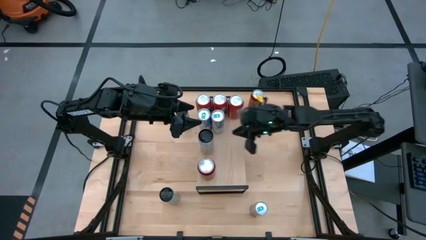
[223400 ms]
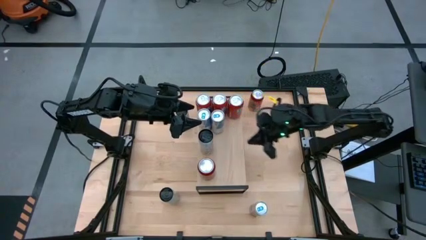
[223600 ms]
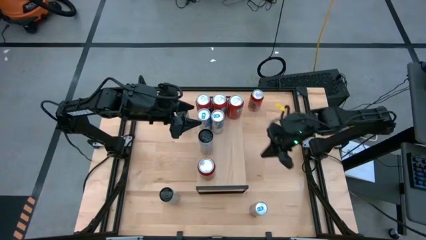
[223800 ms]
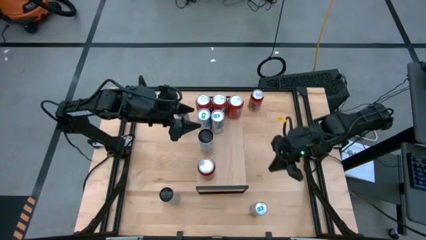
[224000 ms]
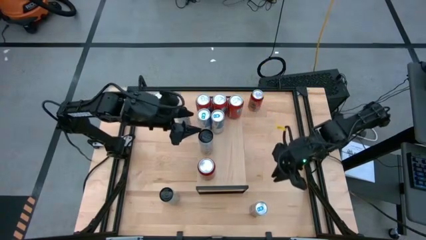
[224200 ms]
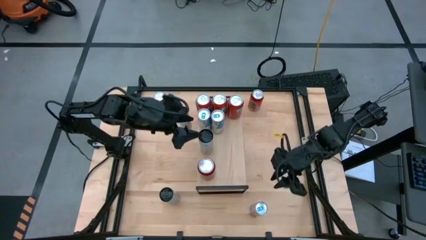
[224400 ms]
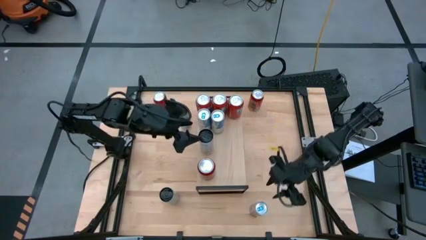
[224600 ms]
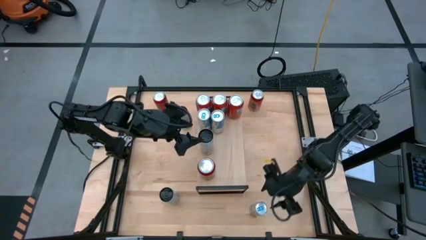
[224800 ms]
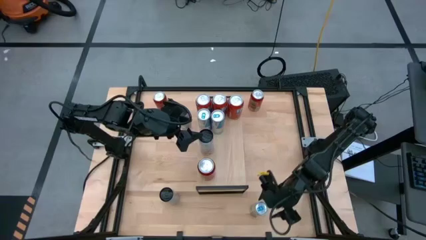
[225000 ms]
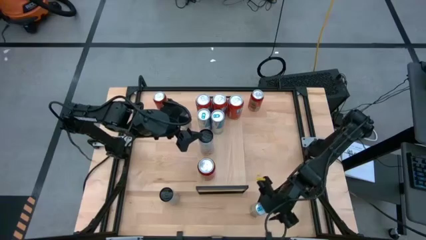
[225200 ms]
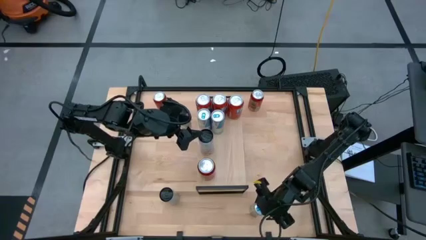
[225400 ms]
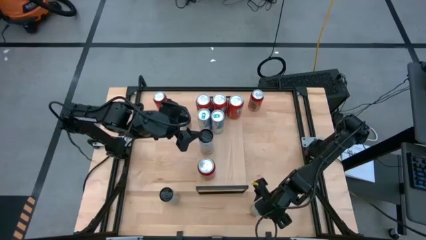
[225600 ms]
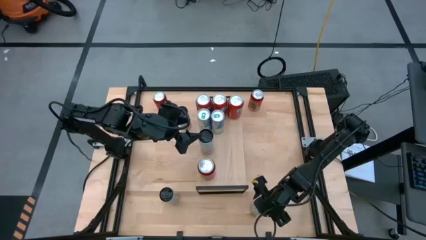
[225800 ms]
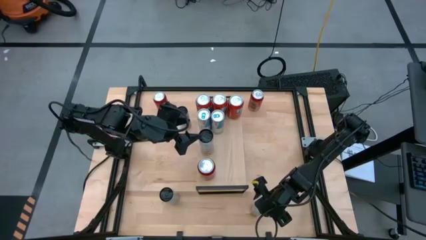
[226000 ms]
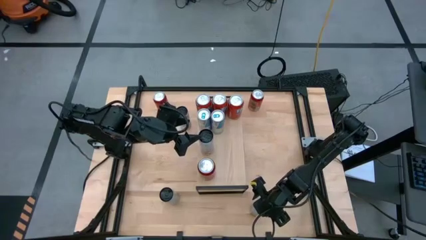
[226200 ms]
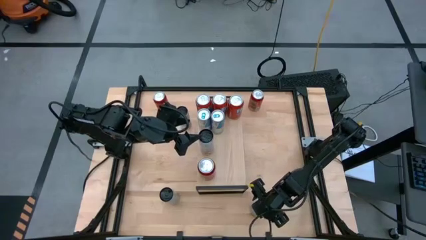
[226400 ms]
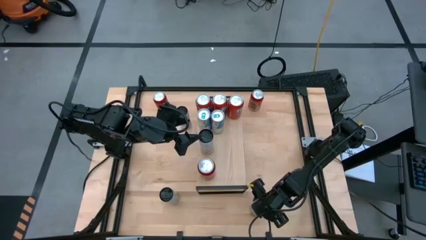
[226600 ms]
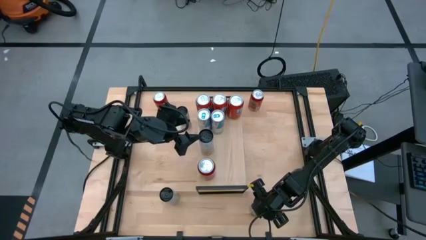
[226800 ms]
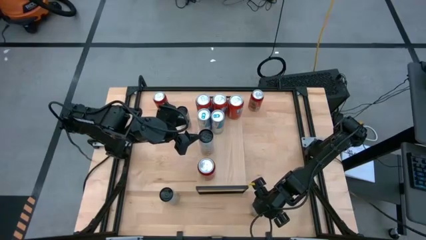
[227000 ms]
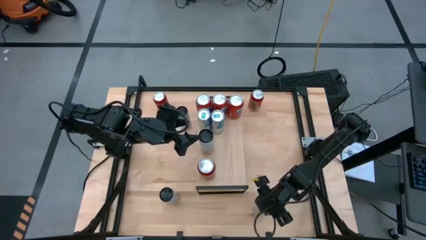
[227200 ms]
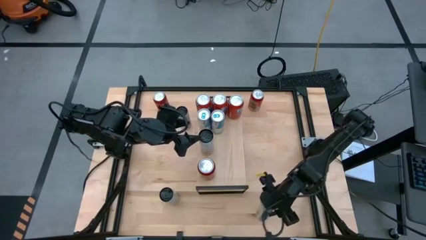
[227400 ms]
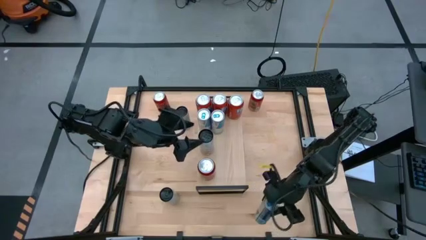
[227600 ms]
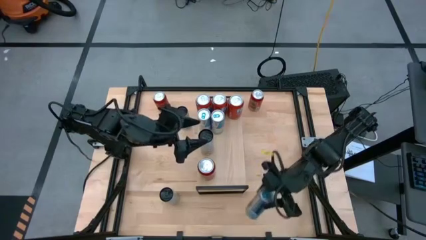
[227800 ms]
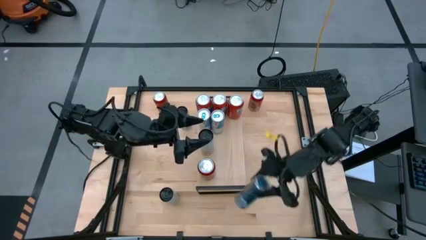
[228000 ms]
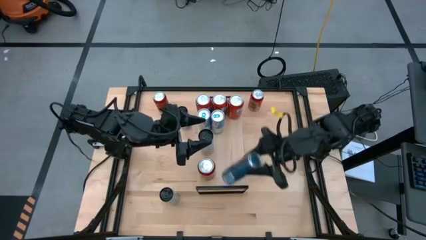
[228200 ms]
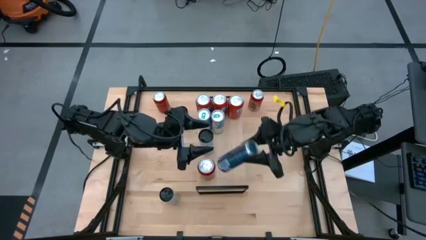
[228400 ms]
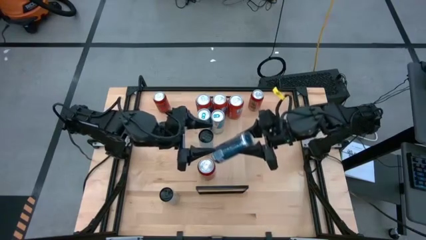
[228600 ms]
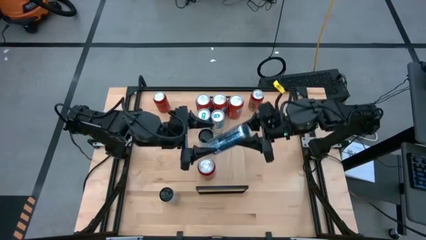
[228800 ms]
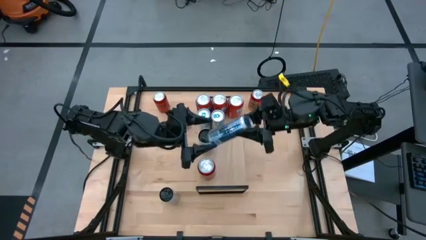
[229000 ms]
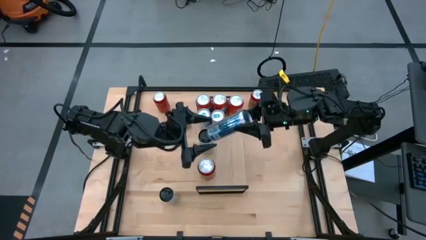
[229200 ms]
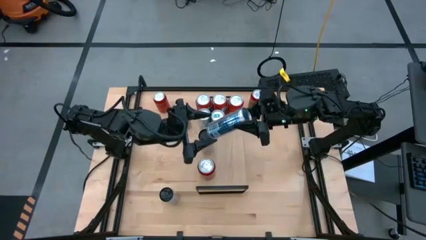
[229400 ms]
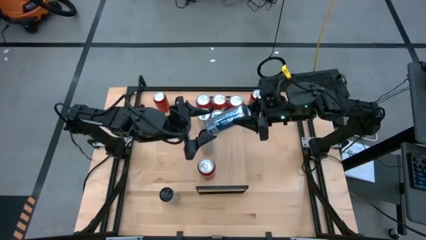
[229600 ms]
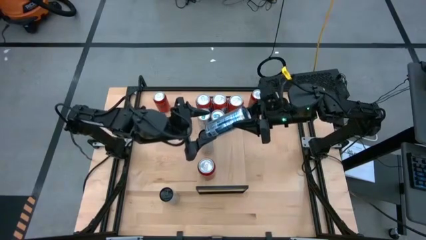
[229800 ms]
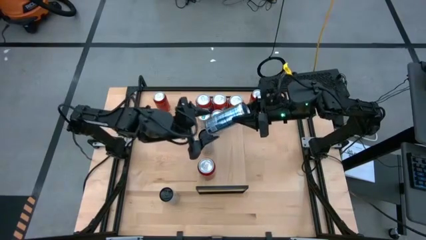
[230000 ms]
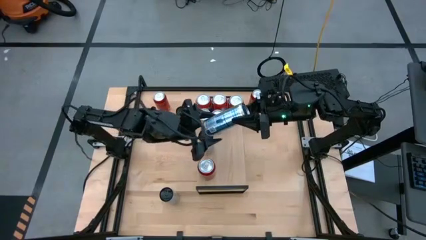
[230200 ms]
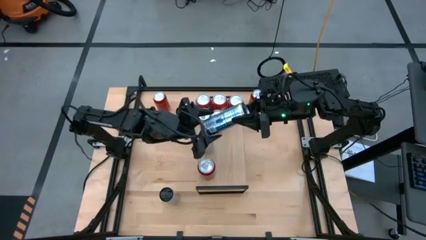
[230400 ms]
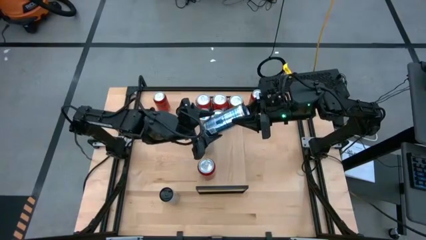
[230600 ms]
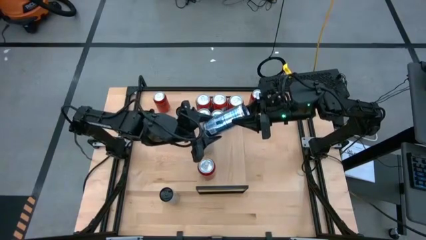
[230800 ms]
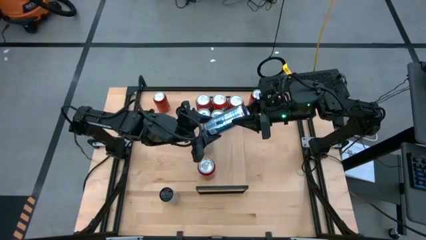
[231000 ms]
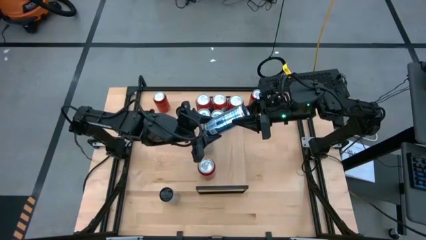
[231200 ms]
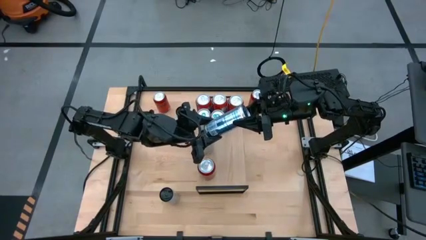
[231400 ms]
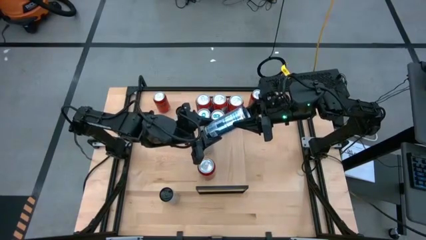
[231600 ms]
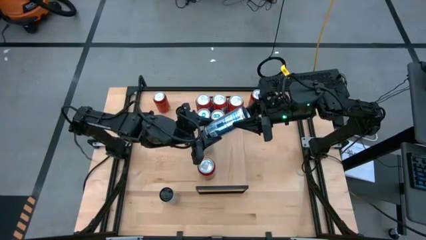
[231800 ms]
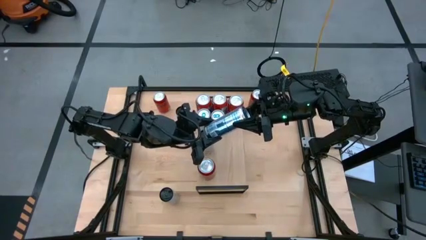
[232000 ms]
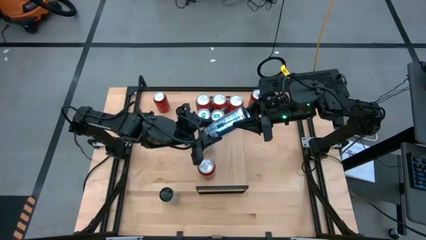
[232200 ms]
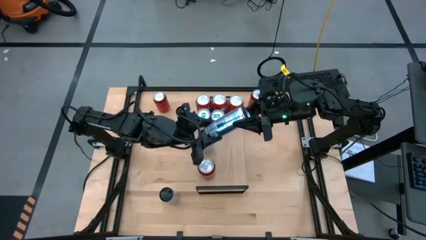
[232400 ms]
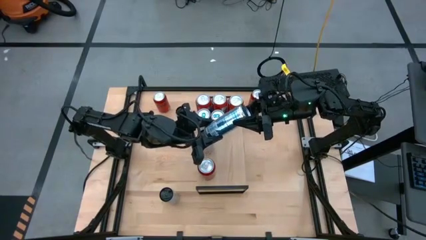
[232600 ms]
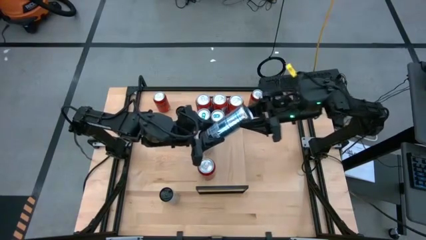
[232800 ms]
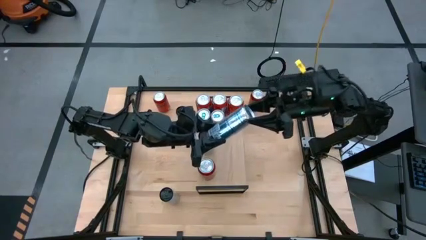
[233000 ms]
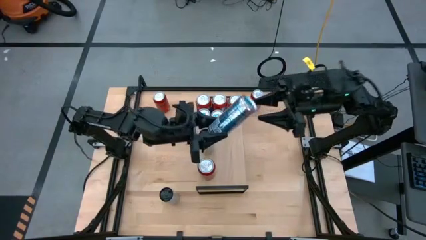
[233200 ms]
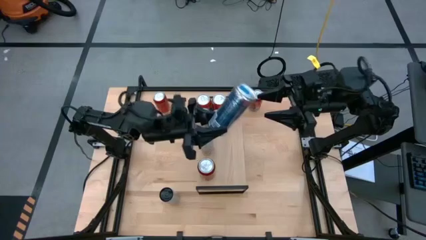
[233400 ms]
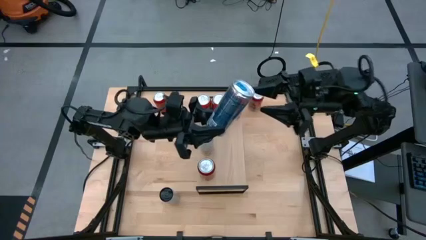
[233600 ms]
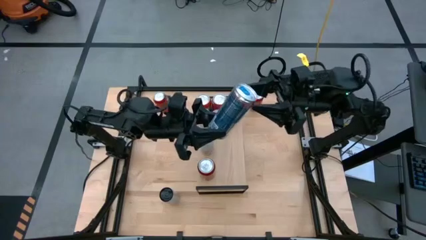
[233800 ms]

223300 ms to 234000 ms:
Task: Place canned beverage on shelf
Put the blue soda can on the shelf aligned with the other blue soda can
